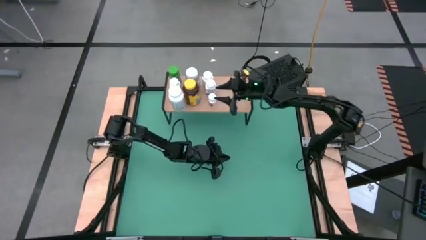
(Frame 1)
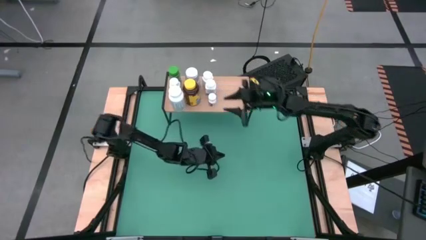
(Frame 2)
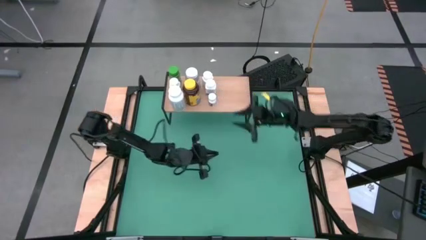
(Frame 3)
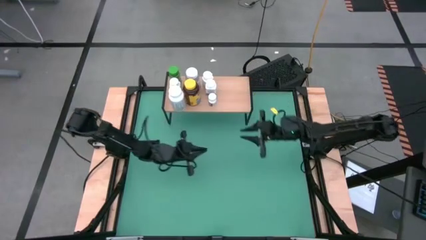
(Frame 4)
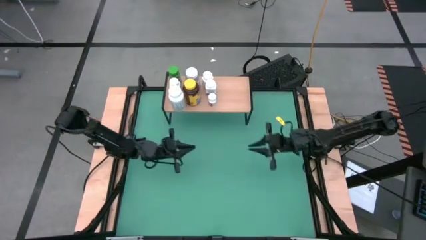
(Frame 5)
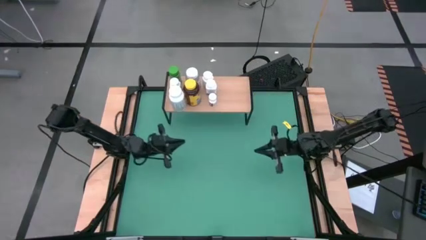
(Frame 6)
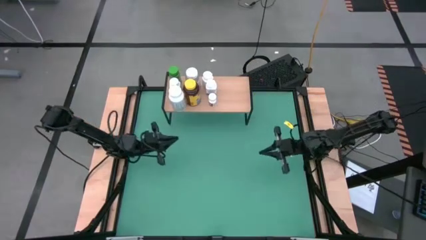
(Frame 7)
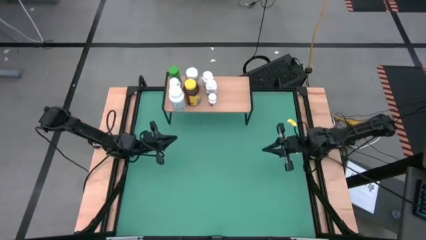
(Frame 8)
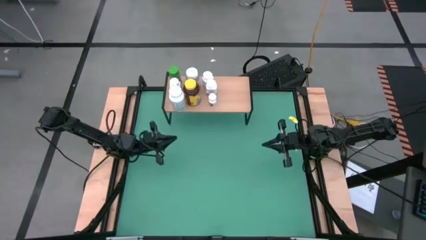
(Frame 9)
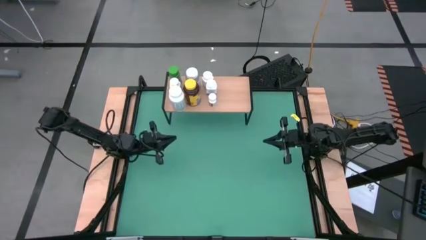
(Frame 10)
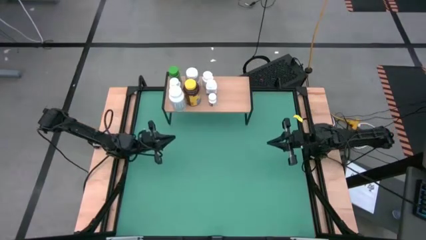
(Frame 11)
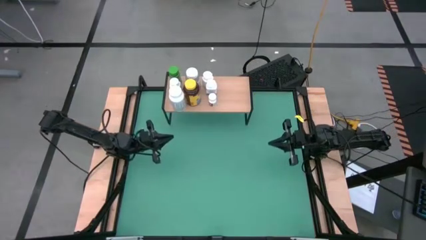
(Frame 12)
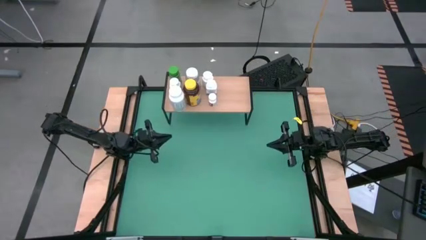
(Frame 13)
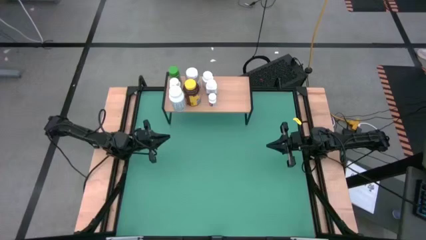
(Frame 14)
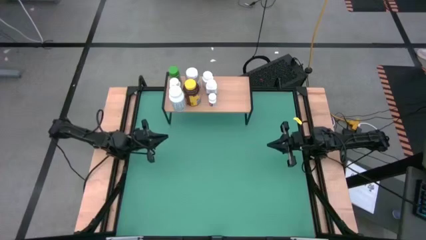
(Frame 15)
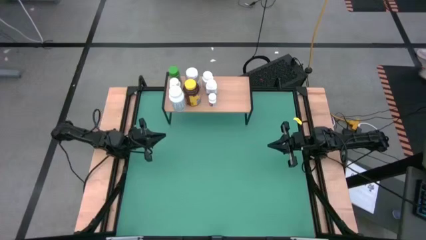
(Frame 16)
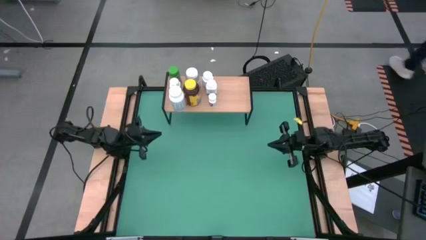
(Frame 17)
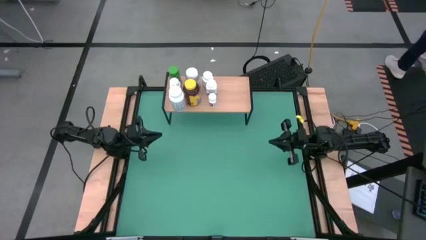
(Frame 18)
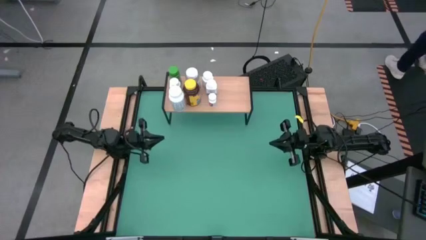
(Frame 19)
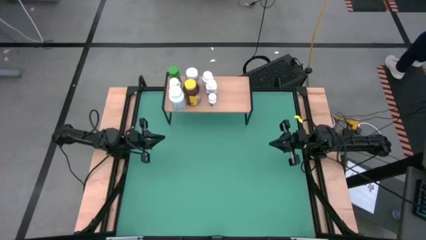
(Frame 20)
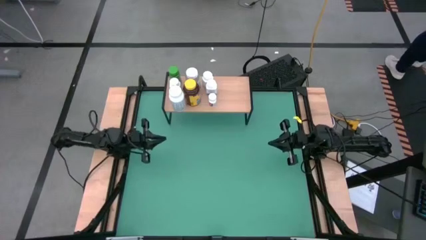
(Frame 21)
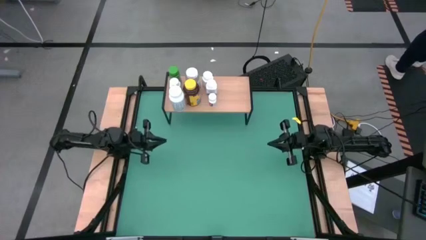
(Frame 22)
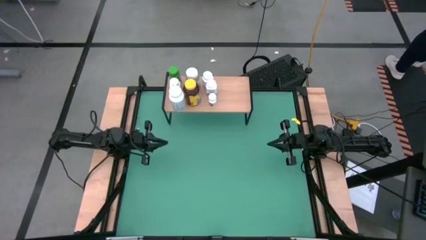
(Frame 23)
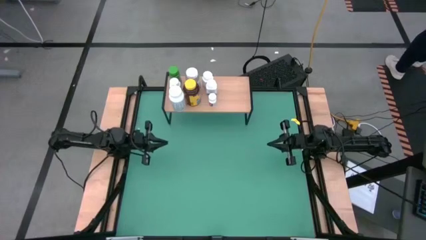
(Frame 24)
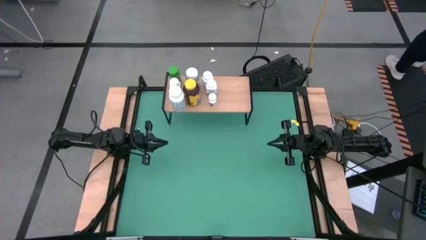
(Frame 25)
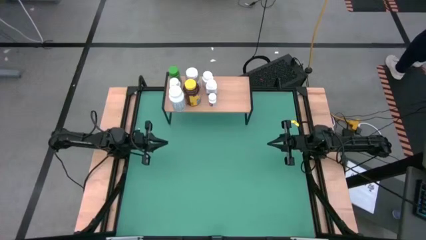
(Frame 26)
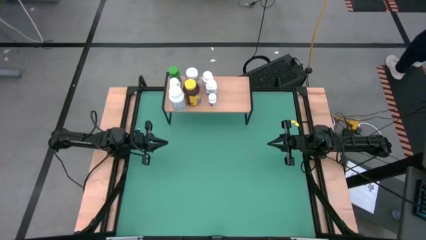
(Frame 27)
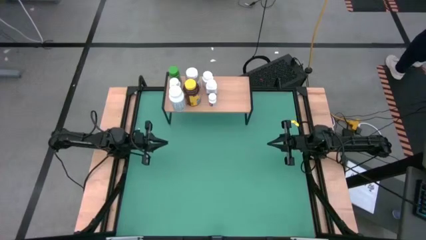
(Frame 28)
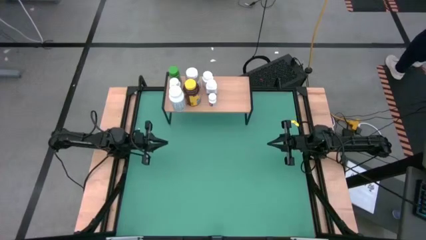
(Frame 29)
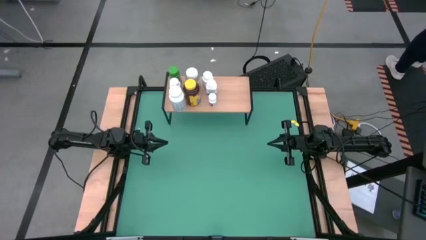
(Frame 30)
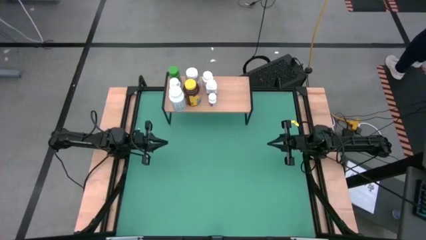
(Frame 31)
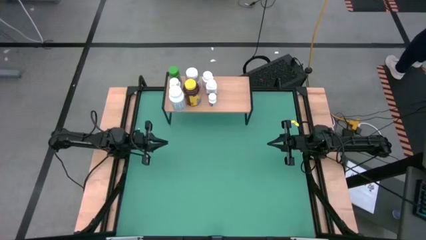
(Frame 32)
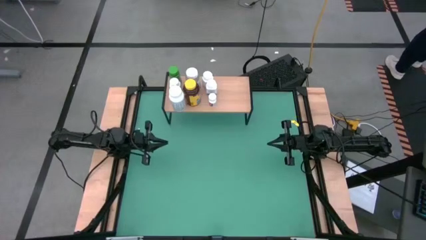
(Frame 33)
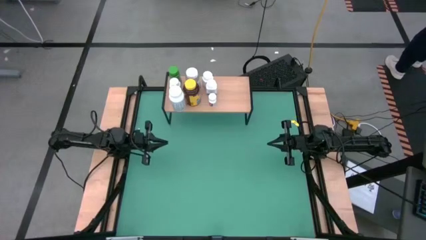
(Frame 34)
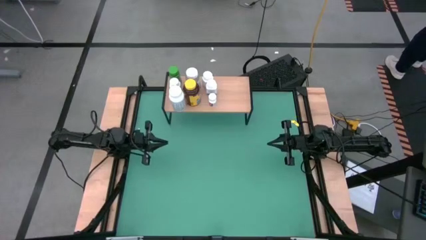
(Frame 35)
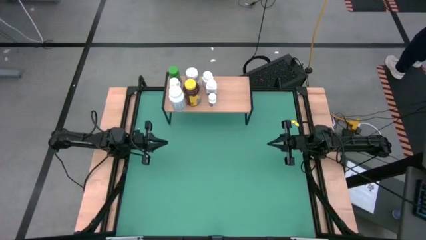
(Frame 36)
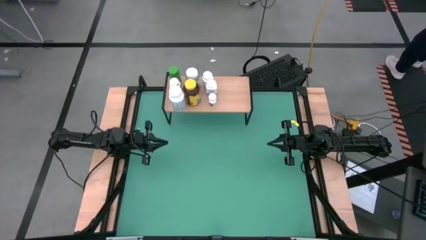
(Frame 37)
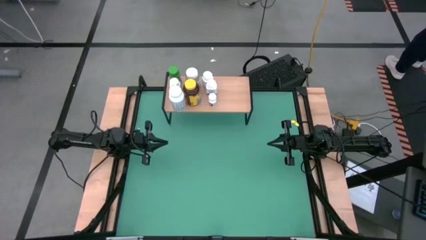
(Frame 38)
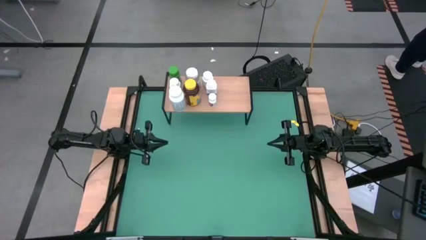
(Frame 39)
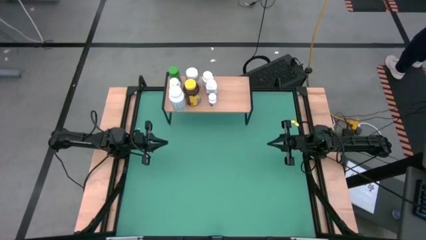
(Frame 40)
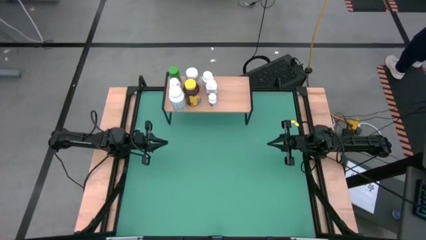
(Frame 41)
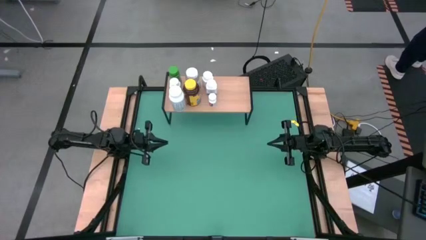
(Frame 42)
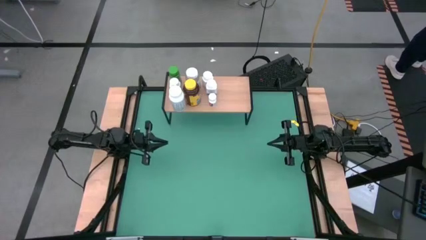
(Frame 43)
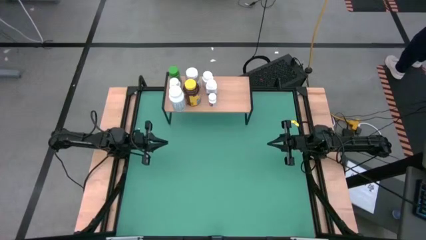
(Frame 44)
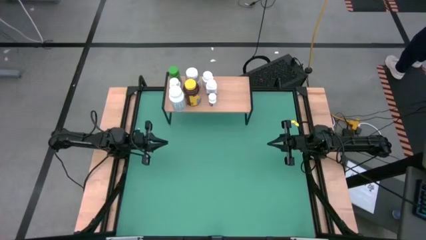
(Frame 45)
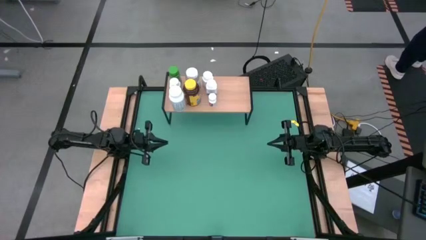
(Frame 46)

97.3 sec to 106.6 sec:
Task: Pick and place medicine bottles onto shelf by color
Return to Home Position

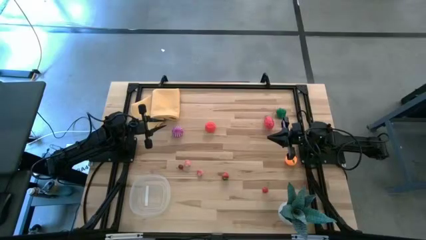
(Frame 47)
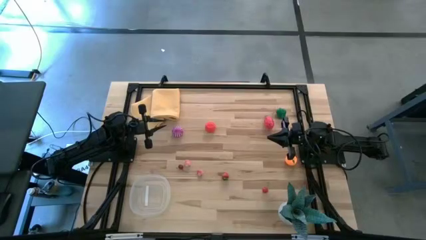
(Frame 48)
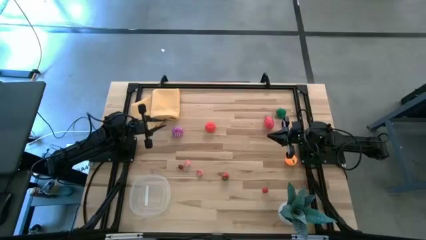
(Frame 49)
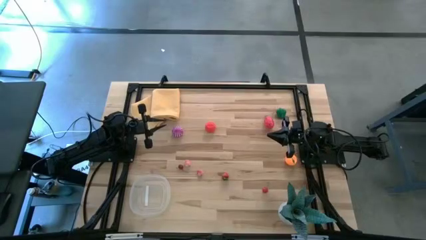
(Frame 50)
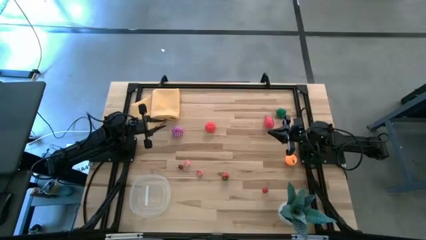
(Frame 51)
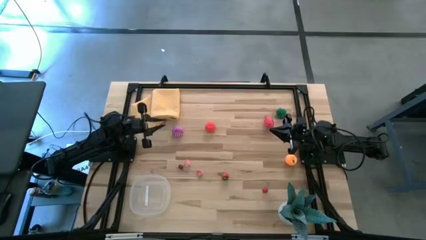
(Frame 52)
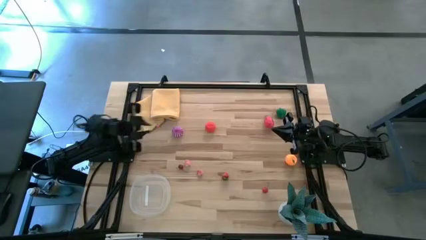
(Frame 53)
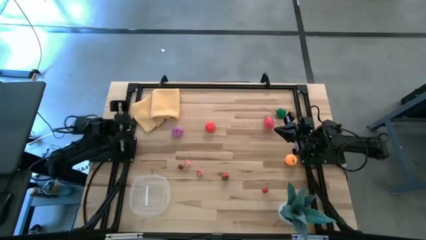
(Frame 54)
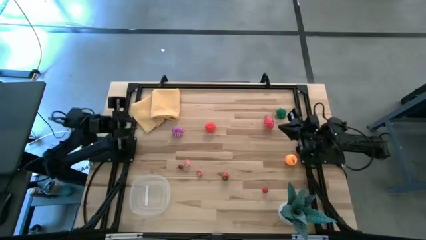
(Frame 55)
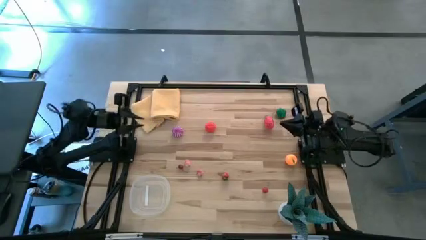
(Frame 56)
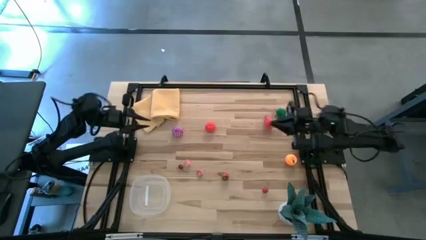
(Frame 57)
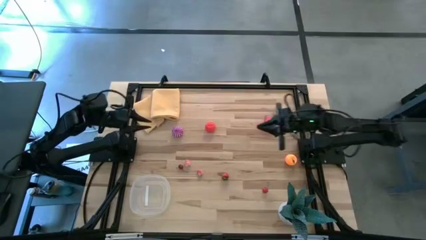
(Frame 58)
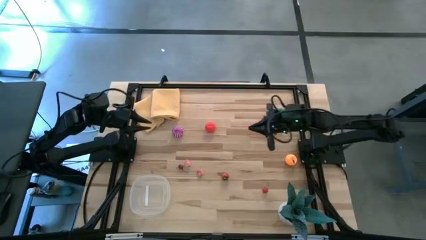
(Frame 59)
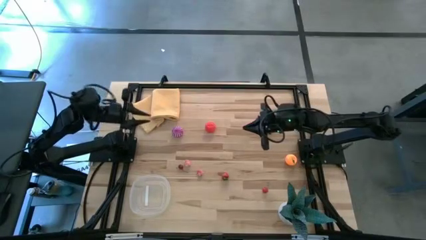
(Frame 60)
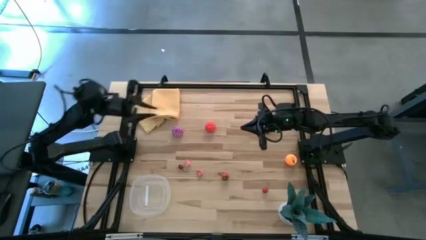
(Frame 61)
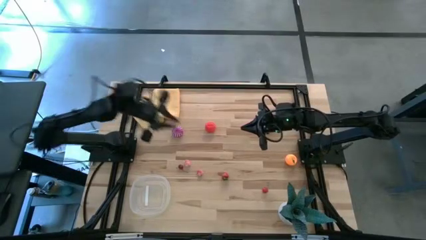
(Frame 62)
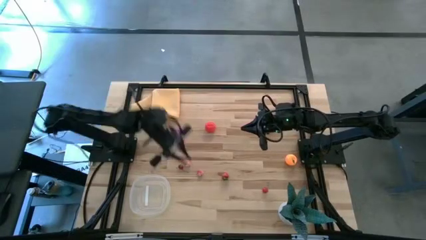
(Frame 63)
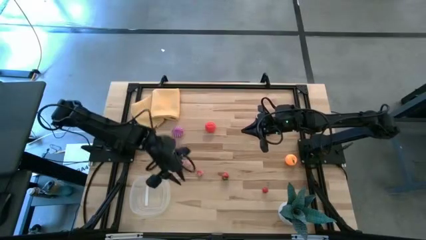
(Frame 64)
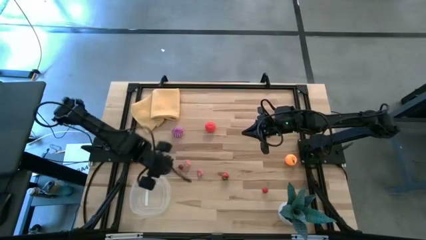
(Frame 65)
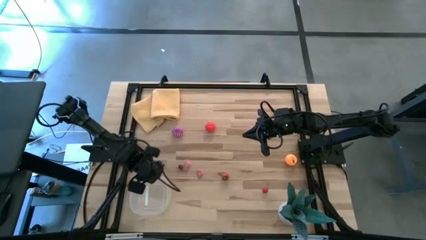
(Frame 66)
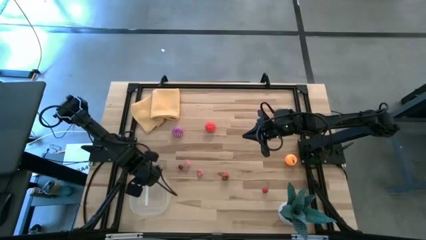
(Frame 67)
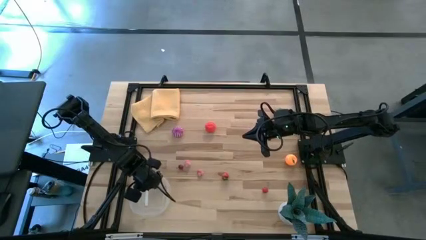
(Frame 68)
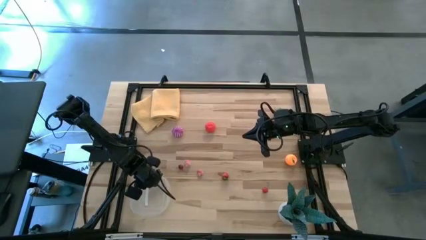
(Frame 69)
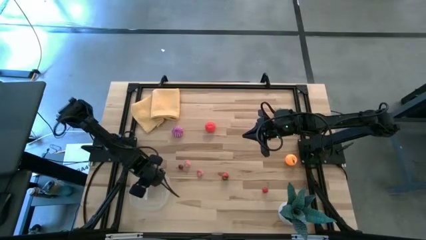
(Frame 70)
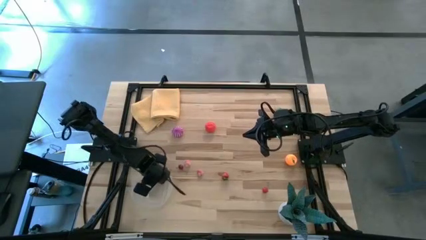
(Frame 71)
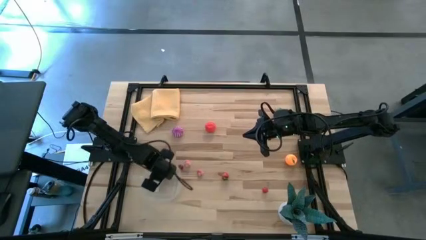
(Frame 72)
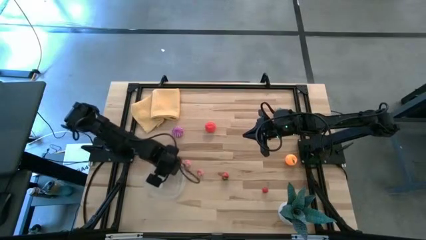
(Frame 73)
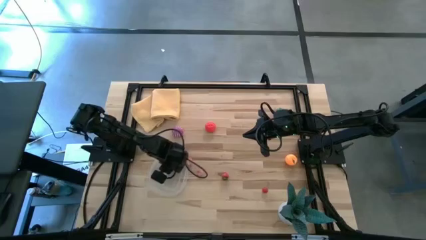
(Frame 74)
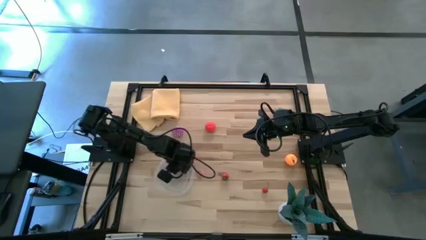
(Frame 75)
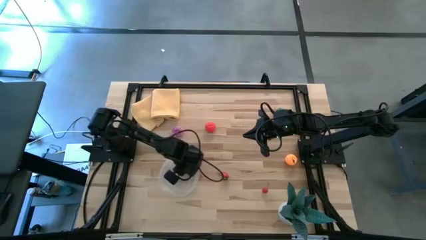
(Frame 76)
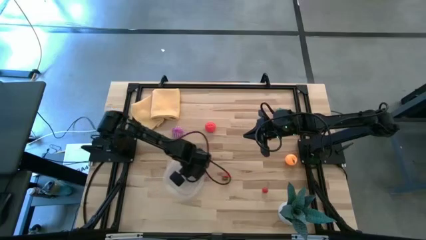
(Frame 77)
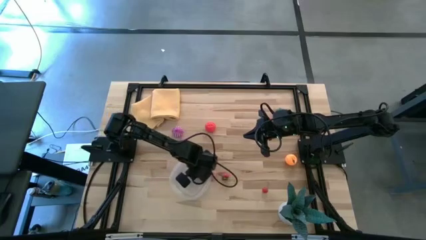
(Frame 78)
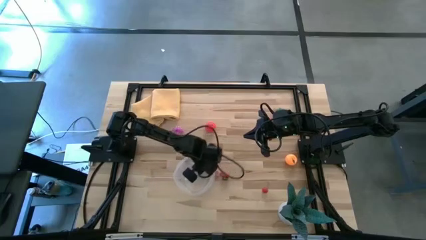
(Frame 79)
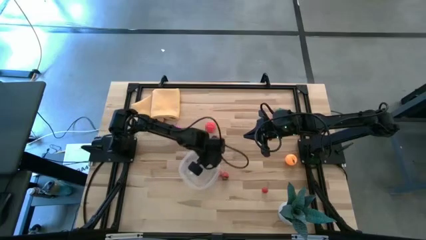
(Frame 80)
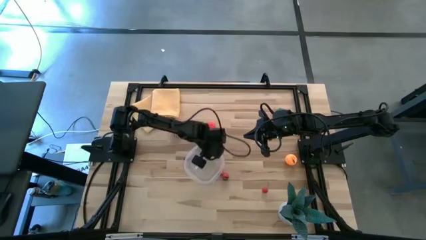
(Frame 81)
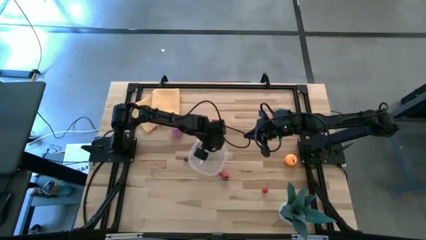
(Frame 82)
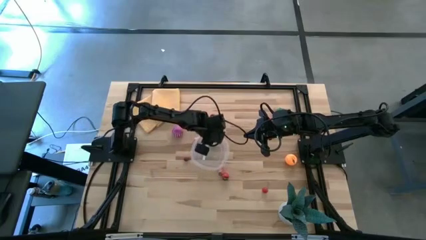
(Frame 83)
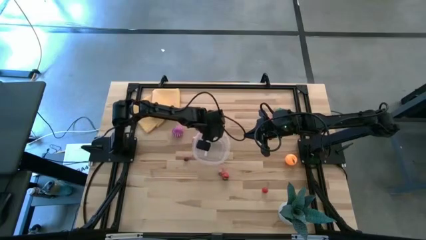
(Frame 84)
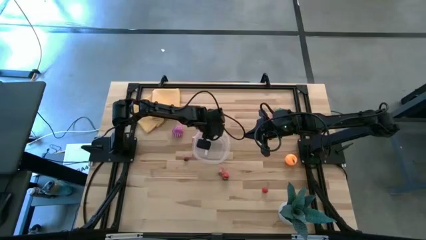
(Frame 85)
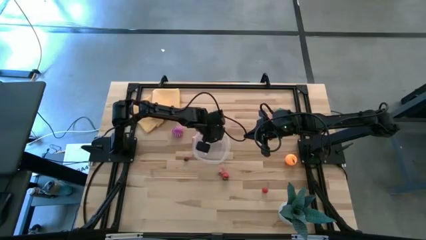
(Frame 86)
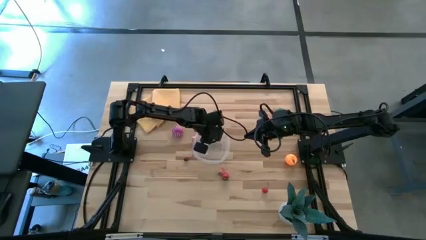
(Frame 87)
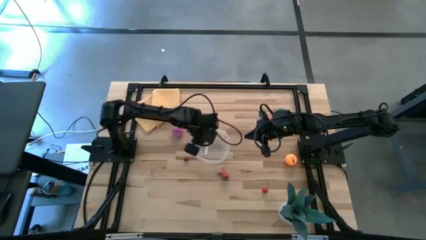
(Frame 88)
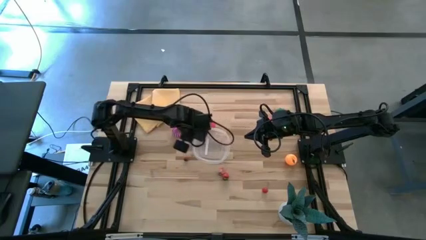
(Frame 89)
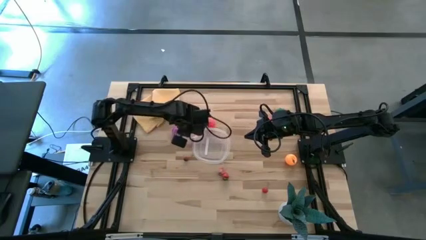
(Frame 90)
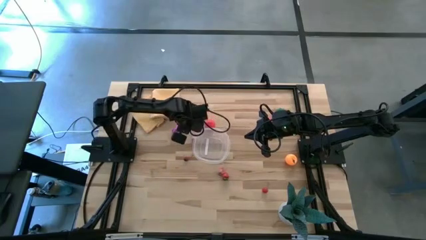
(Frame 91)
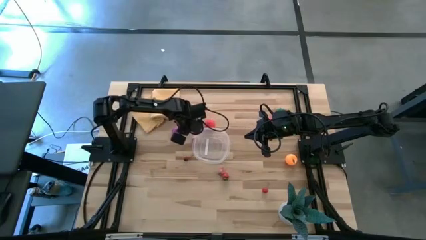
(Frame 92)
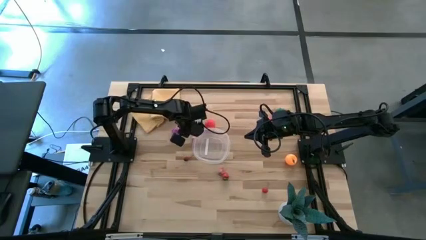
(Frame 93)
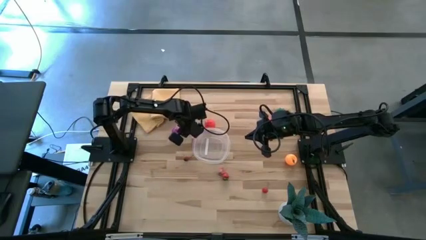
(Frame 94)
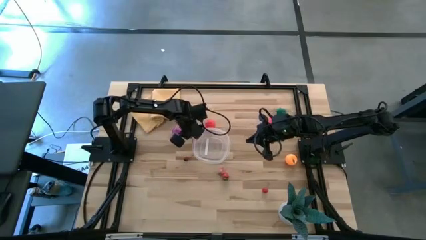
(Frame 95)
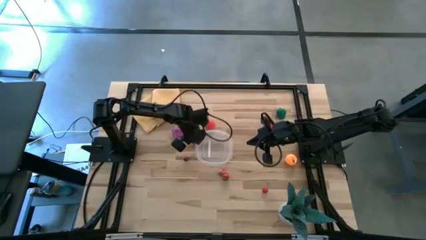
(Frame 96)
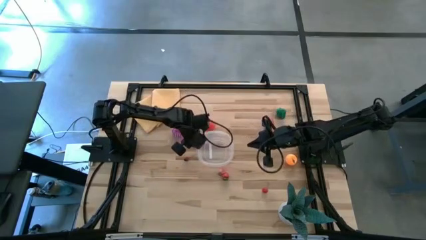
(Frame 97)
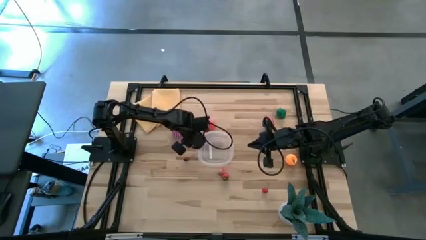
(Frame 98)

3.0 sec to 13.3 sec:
Task: Pick and placing Produce into tupperware
Move the transparent bin to the center
